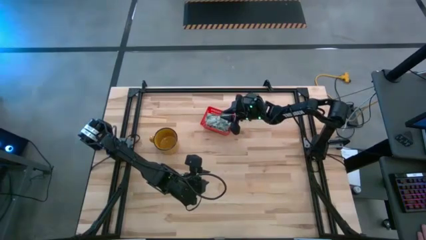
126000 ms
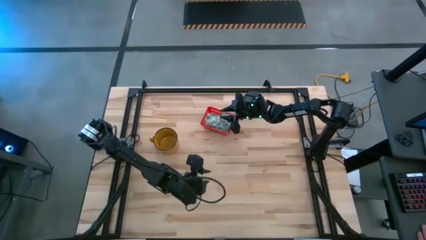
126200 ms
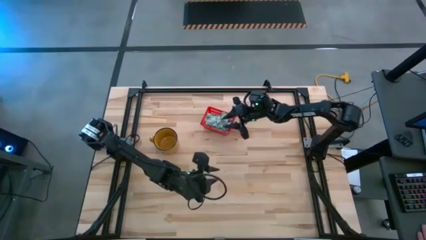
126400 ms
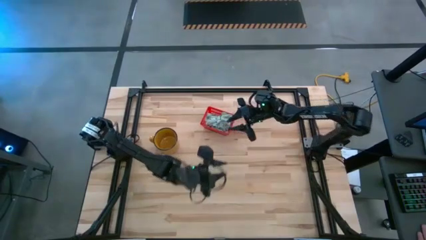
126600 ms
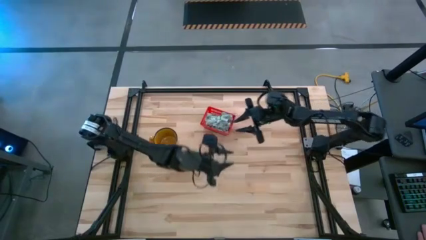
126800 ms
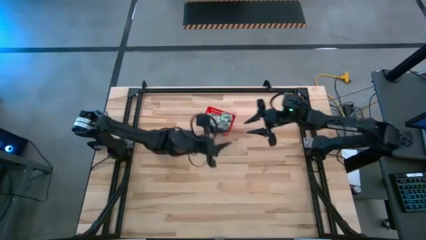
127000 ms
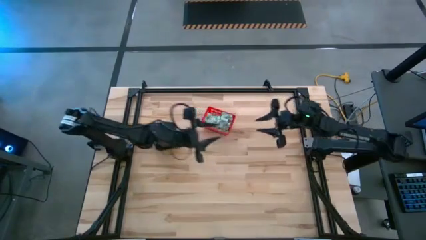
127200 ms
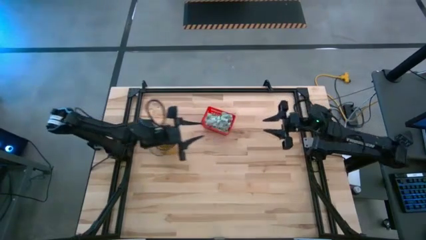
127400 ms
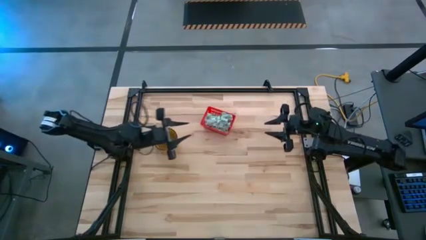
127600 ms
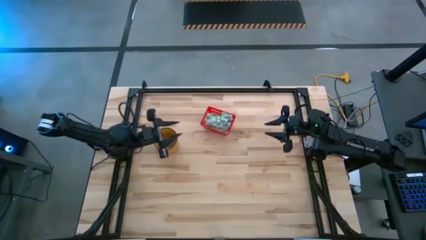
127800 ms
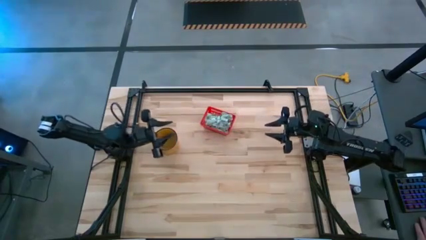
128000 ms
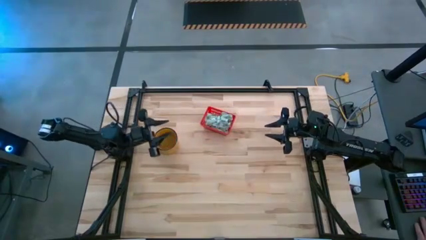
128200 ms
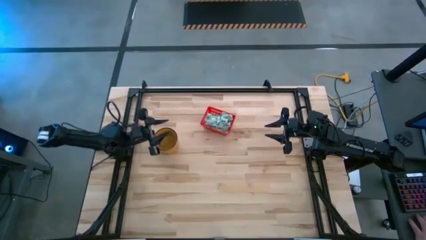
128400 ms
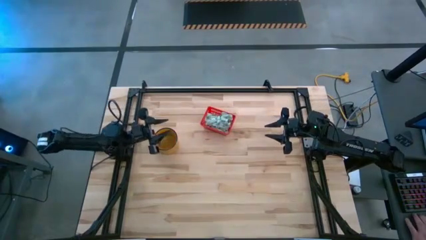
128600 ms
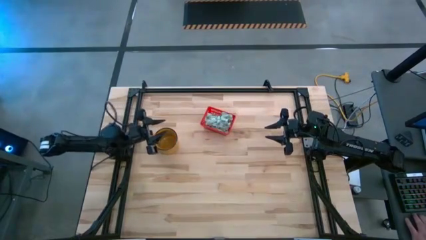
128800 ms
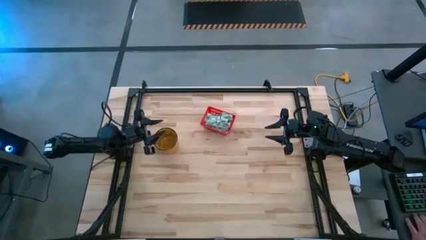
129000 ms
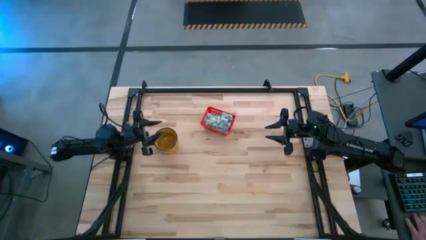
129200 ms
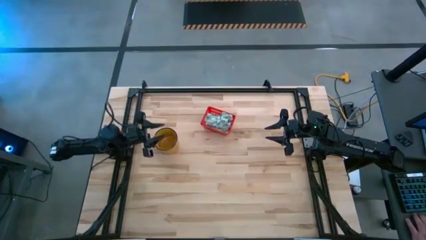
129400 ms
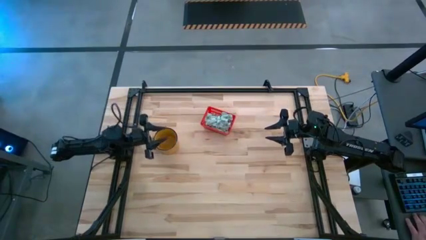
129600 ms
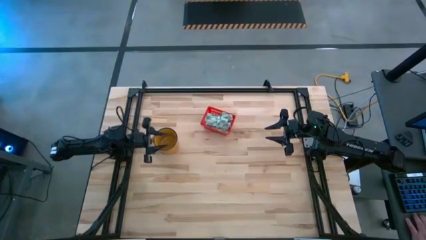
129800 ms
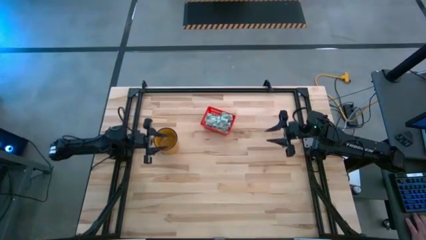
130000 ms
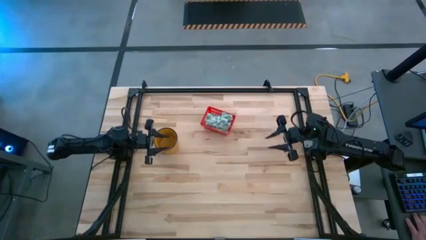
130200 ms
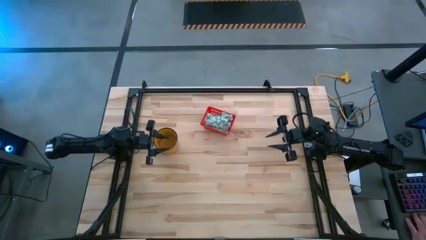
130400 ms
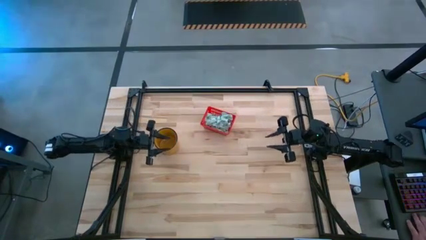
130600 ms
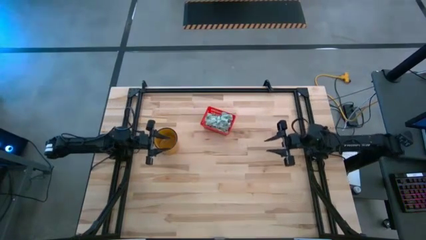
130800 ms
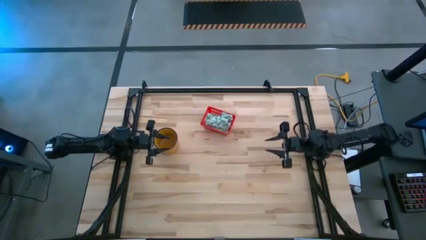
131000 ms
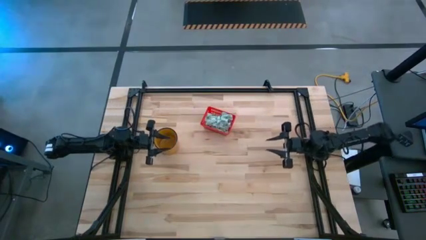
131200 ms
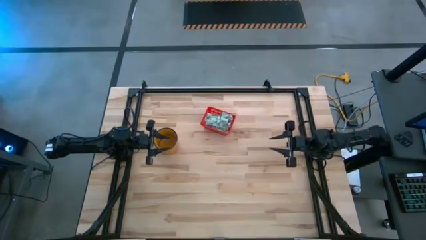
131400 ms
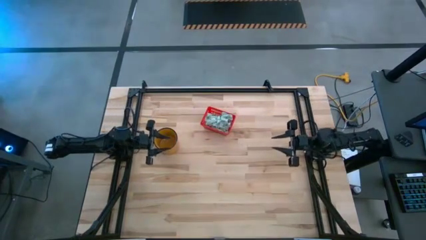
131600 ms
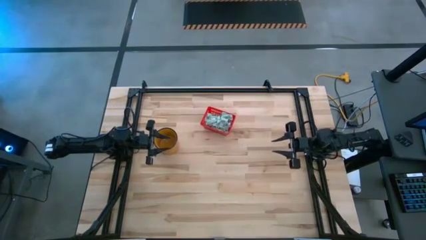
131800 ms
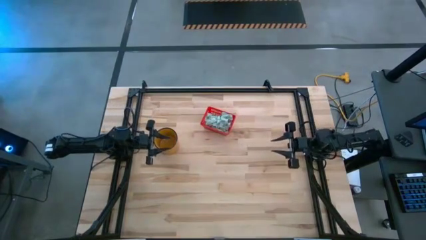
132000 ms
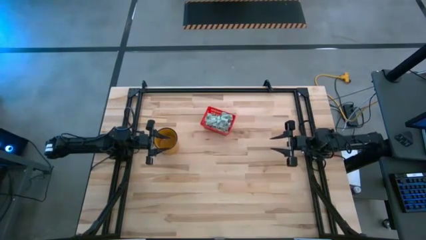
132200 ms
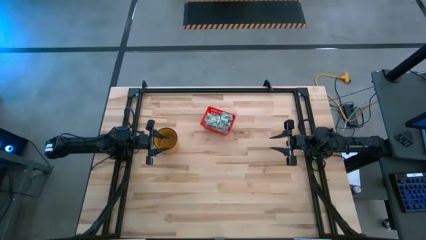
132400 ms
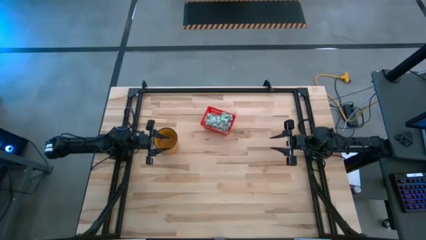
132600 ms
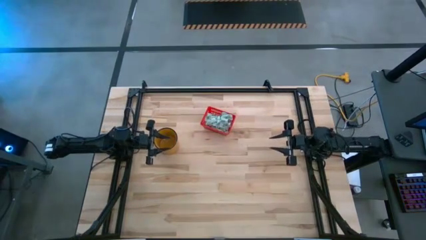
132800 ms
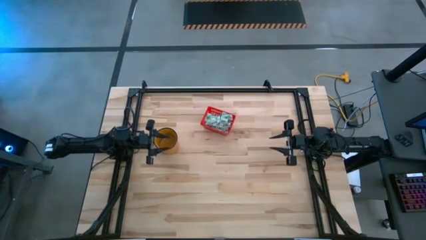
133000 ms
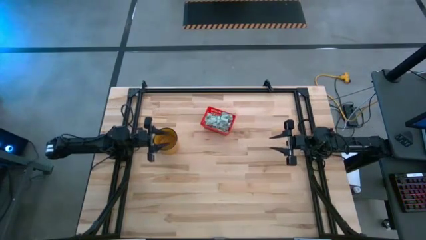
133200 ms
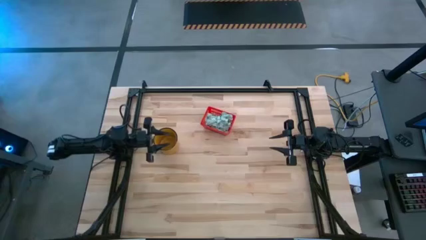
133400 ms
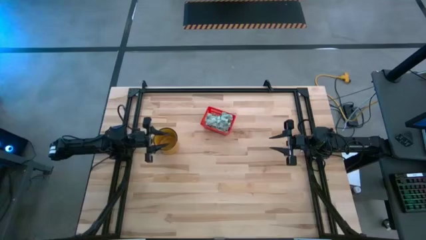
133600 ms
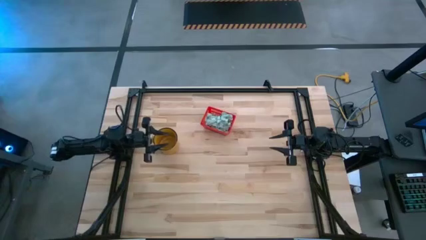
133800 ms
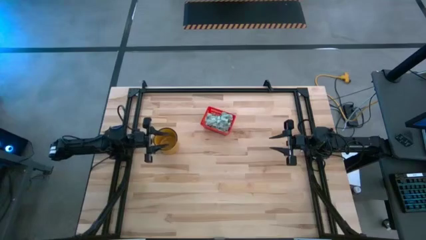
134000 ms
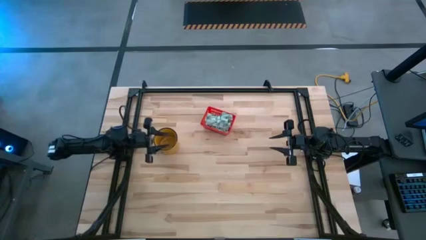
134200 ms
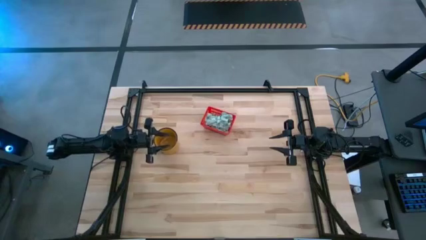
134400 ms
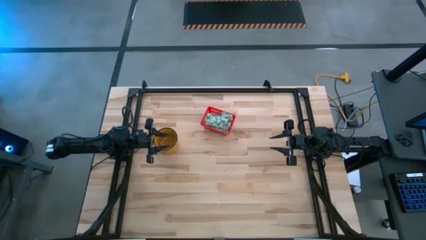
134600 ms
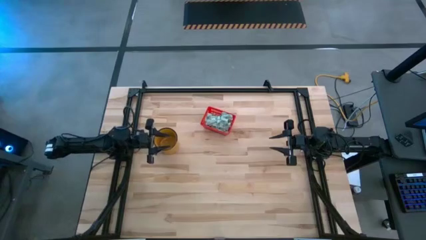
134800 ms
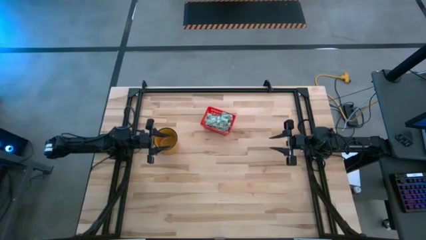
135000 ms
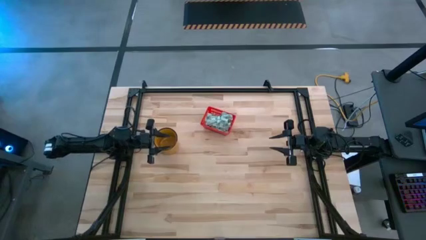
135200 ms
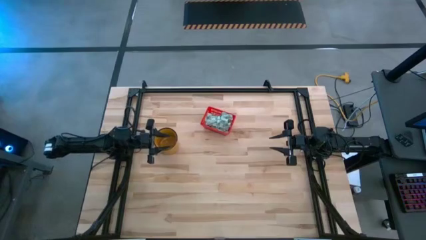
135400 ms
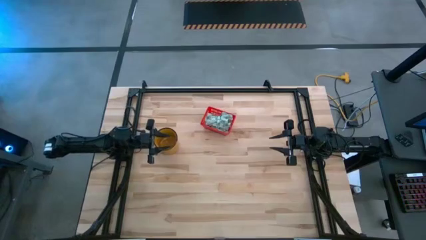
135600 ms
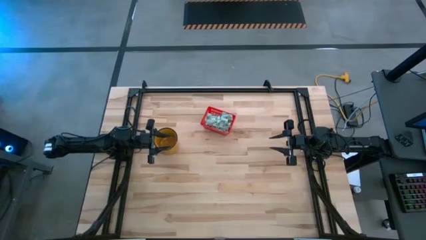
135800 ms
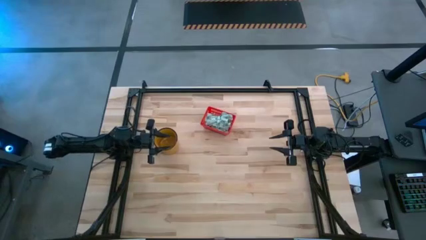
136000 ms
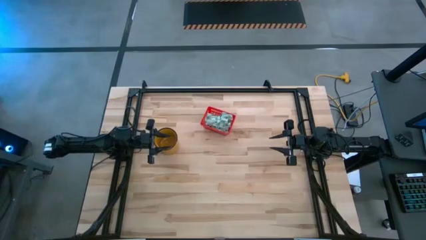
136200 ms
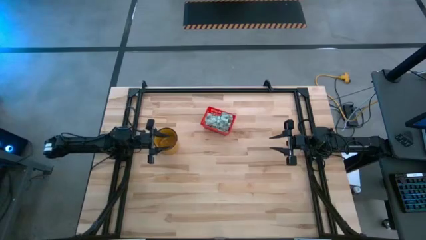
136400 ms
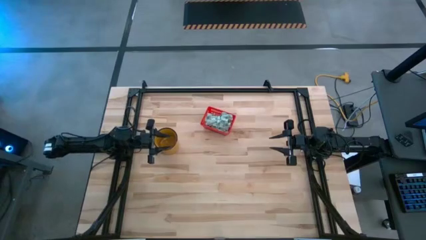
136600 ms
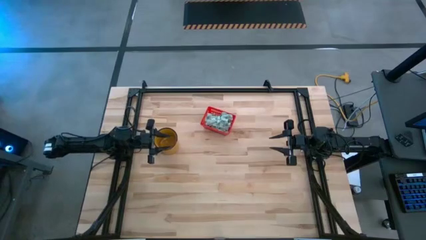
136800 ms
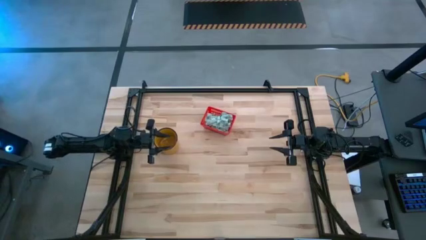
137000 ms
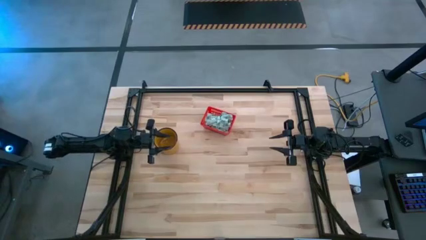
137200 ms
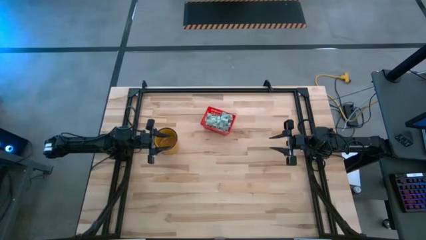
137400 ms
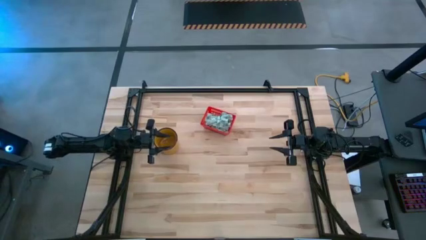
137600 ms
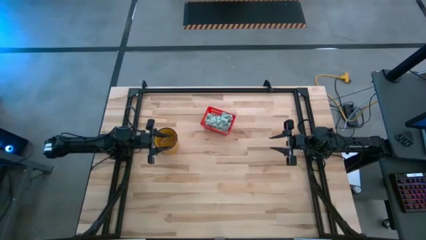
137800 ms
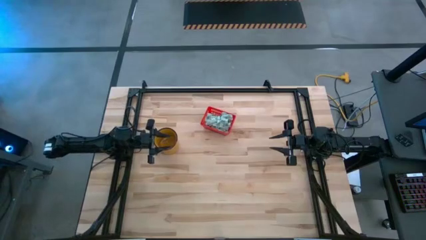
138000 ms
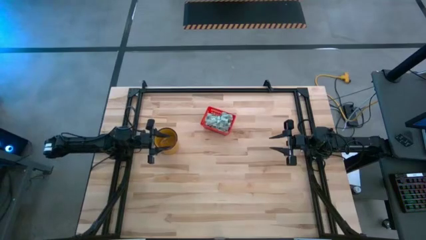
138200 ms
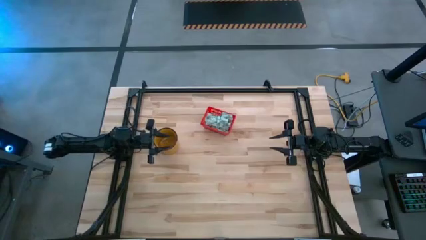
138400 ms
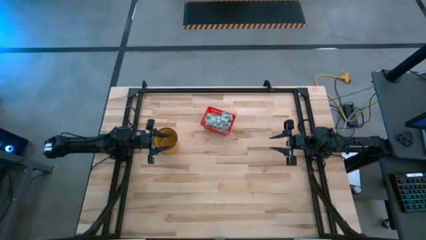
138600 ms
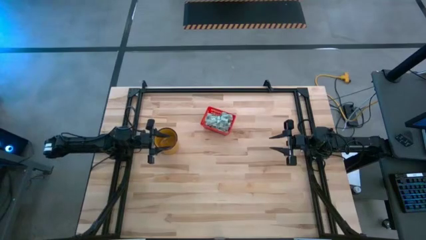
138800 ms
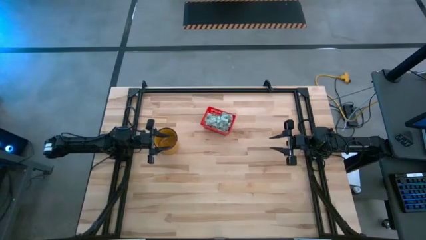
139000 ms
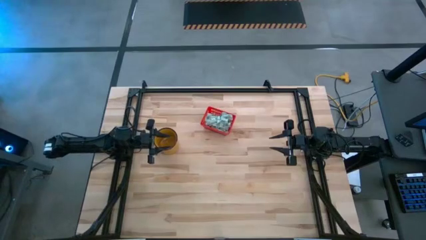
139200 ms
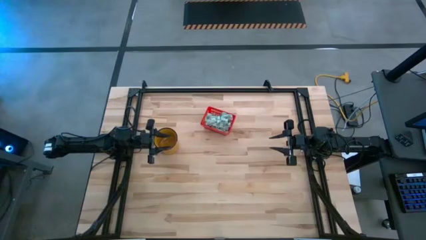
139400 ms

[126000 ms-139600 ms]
Task: Pick and place Stevia / Truvia into bins
Return to Home Position

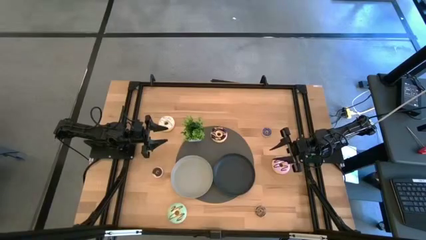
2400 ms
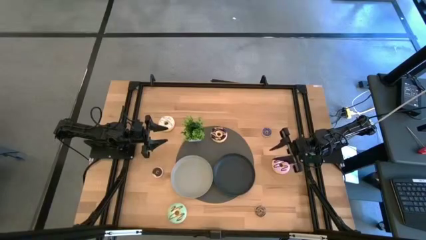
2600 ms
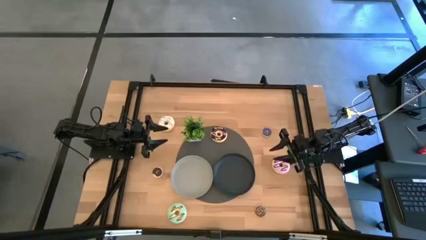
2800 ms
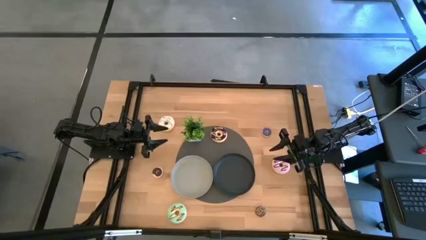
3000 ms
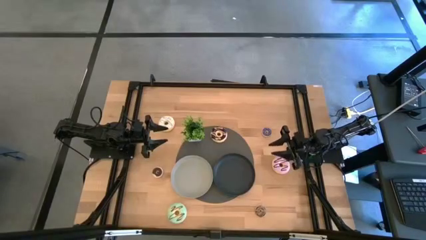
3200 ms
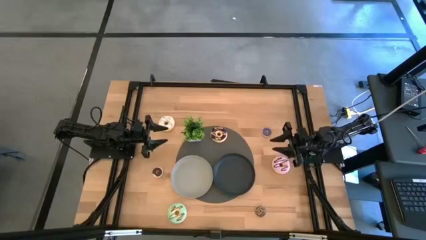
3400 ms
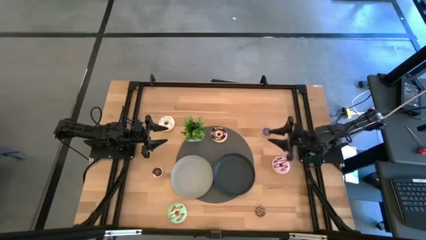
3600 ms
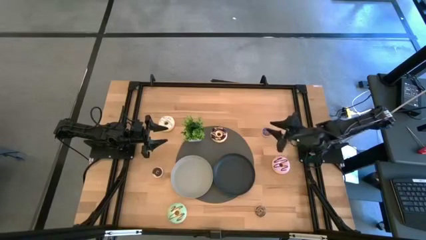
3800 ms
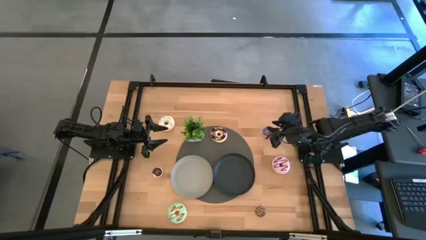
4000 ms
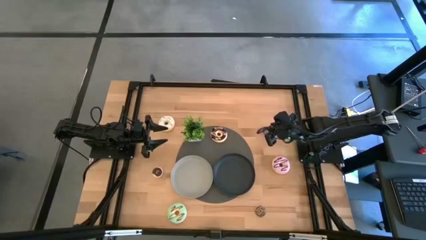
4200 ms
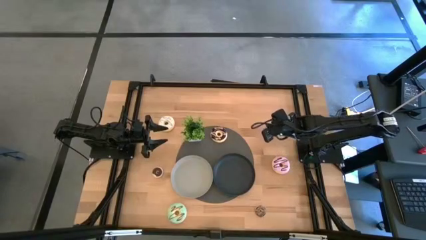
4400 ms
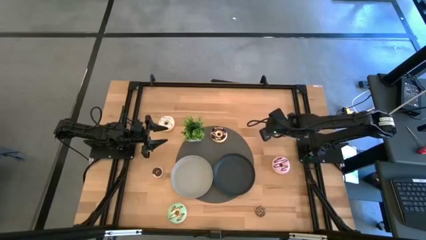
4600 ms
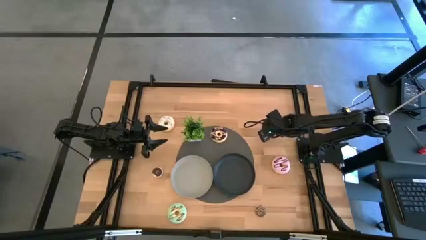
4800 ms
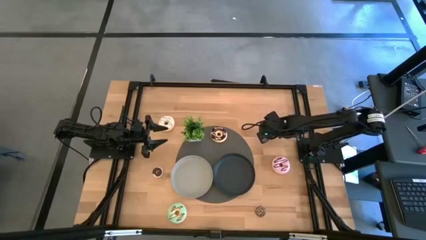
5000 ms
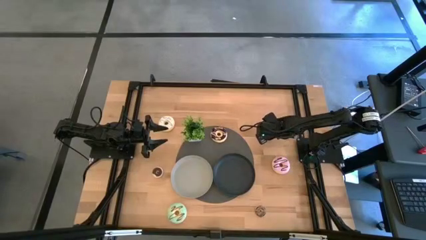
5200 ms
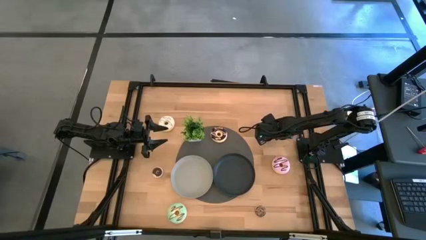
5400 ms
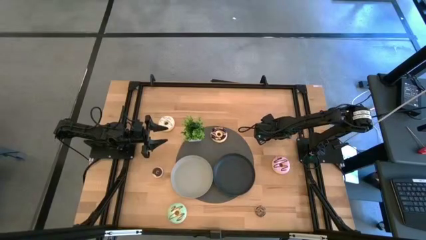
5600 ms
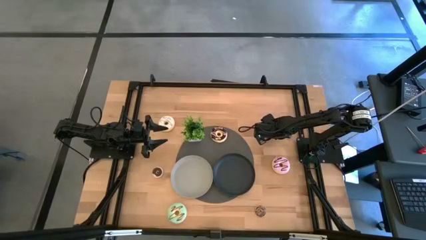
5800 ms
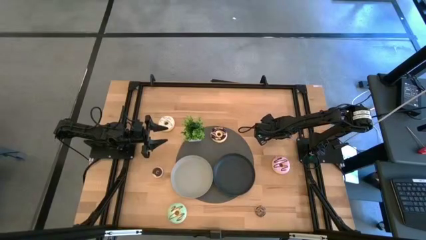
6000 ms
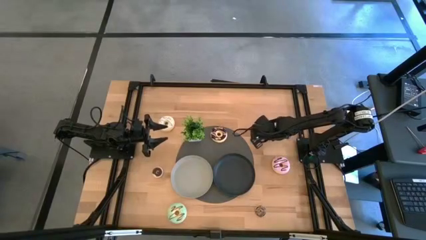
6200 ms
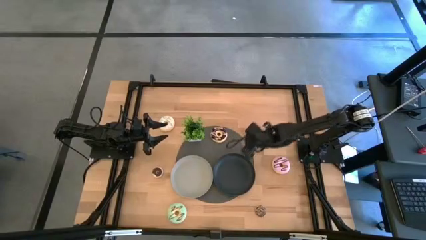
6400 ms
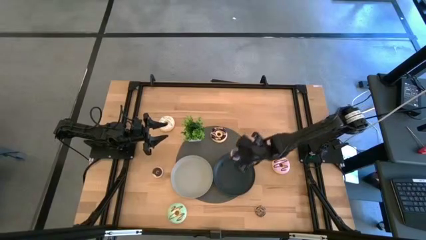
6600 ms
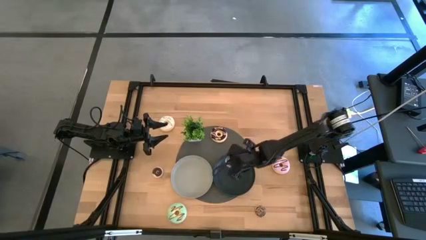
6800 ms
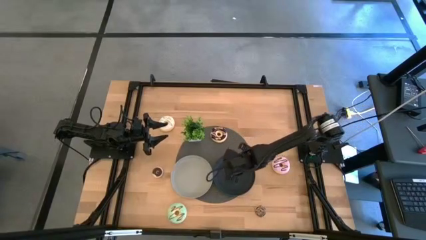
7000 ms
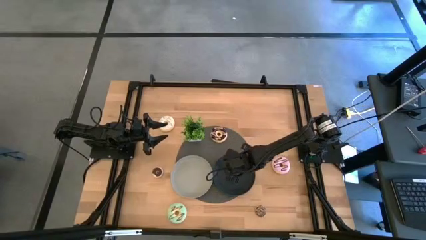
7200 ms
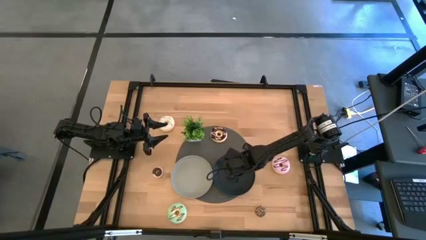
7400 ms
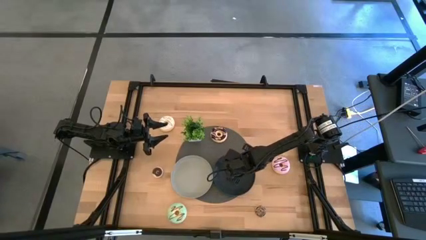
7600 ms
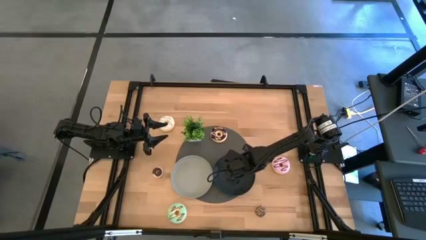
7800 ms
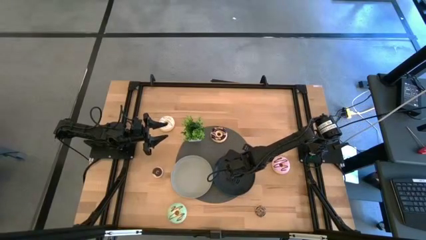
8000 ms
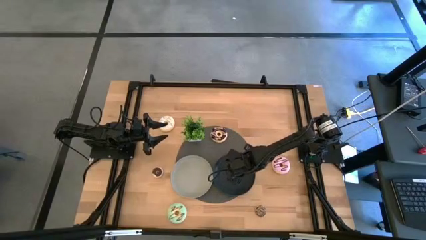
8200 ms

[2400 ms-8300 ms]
Task: Pick & Place donuts
Put the small blue donut on the black plate
